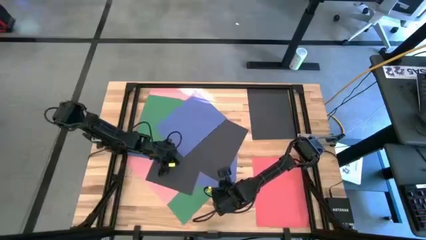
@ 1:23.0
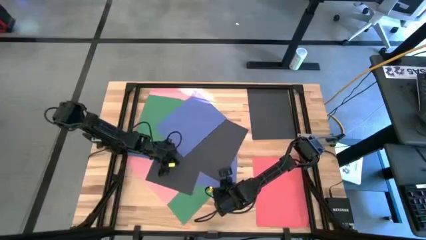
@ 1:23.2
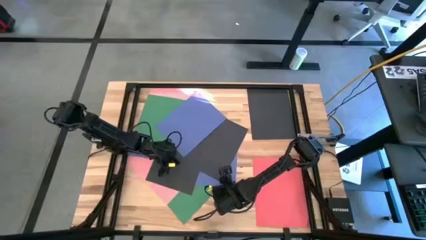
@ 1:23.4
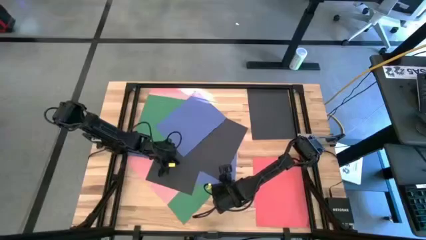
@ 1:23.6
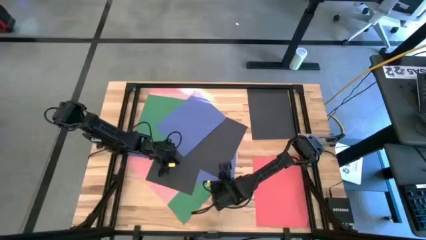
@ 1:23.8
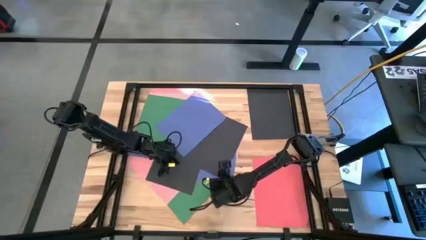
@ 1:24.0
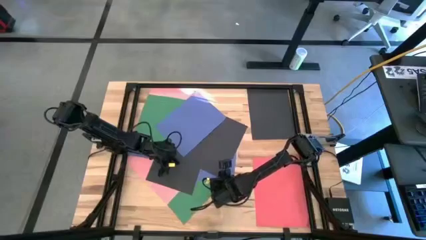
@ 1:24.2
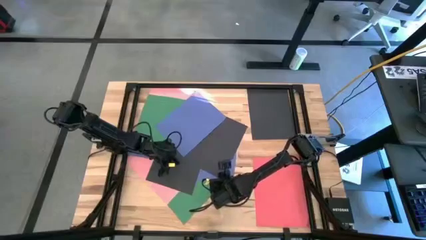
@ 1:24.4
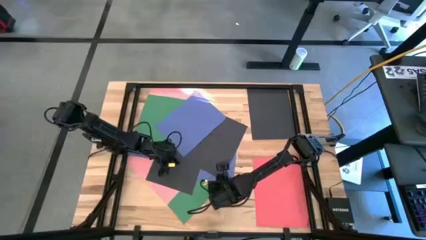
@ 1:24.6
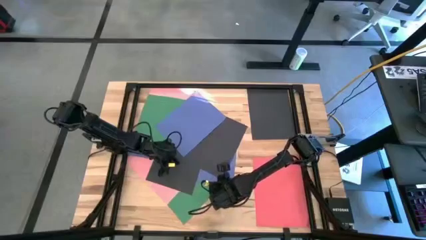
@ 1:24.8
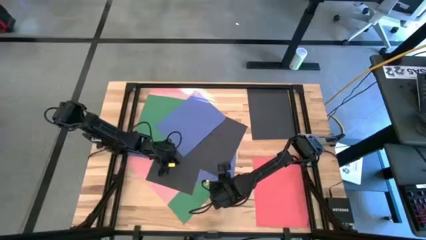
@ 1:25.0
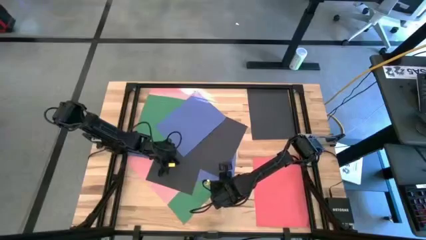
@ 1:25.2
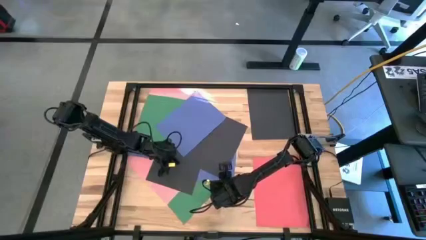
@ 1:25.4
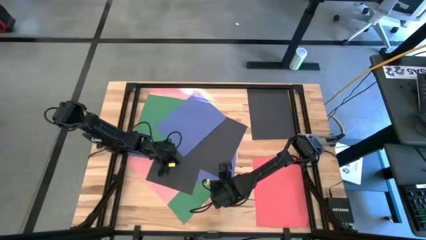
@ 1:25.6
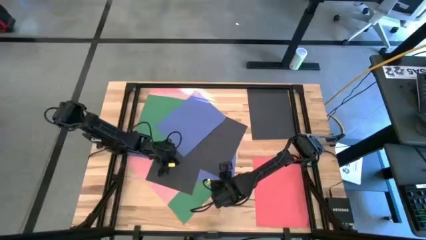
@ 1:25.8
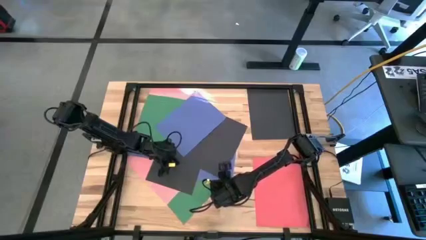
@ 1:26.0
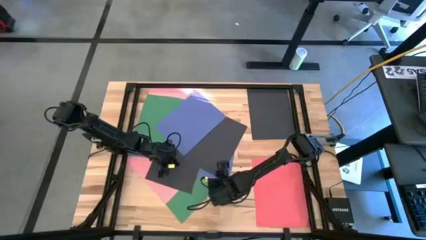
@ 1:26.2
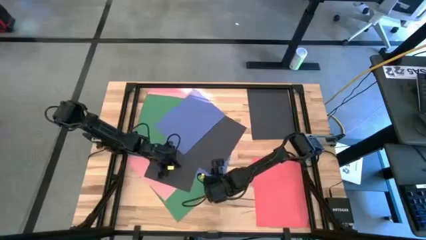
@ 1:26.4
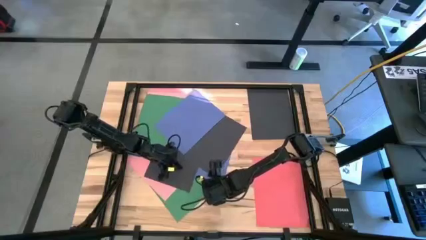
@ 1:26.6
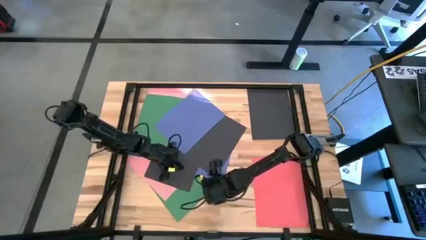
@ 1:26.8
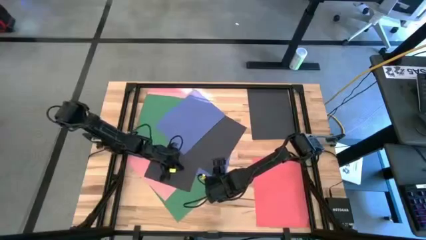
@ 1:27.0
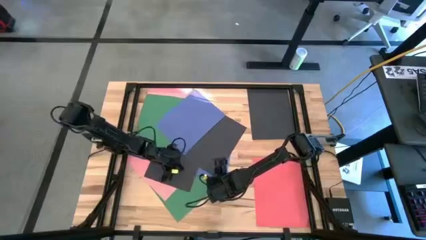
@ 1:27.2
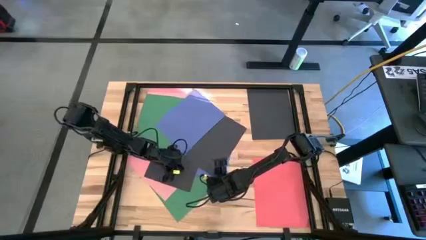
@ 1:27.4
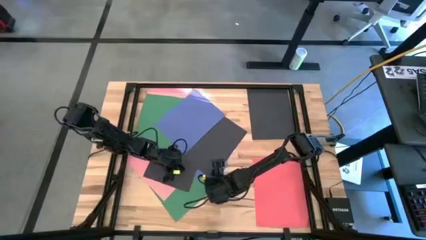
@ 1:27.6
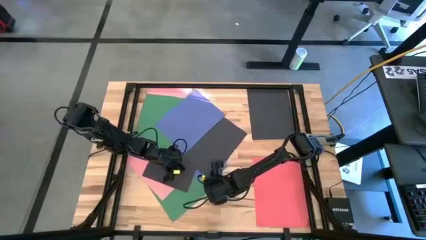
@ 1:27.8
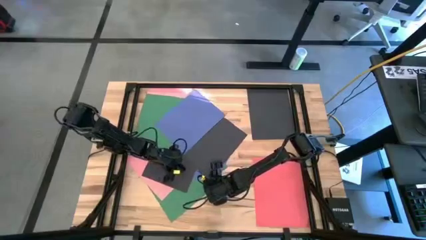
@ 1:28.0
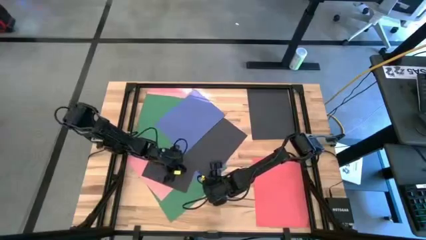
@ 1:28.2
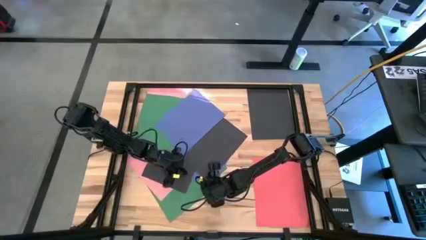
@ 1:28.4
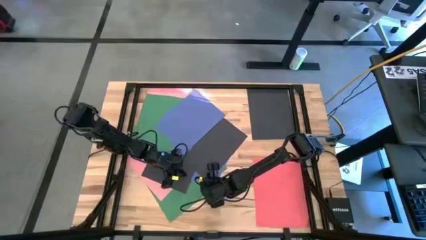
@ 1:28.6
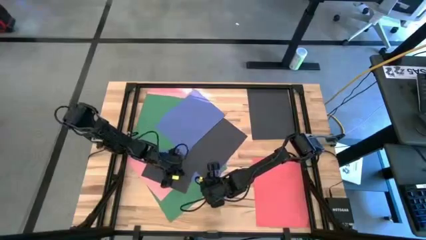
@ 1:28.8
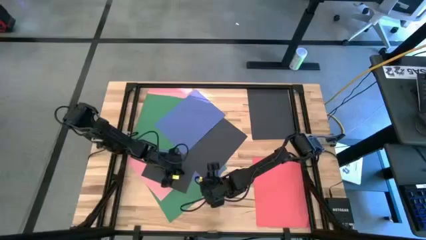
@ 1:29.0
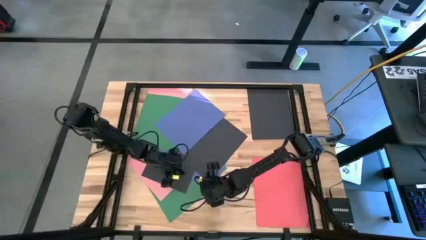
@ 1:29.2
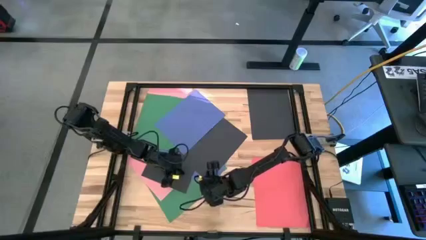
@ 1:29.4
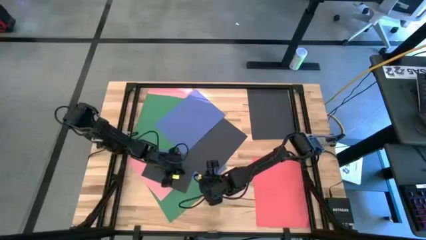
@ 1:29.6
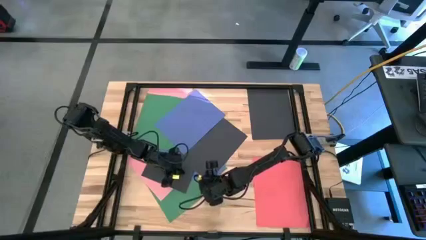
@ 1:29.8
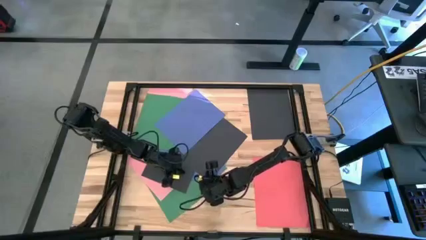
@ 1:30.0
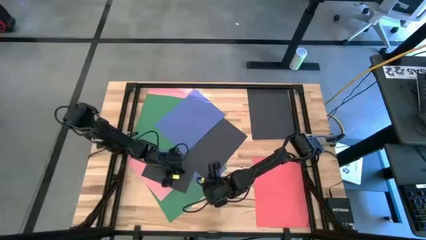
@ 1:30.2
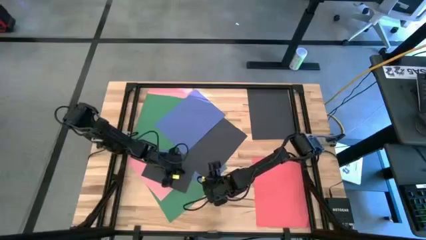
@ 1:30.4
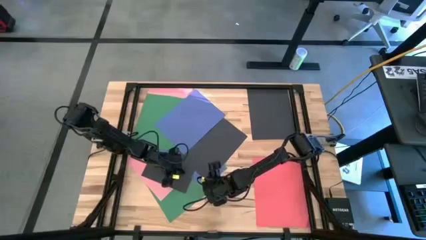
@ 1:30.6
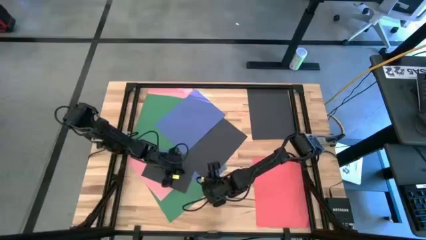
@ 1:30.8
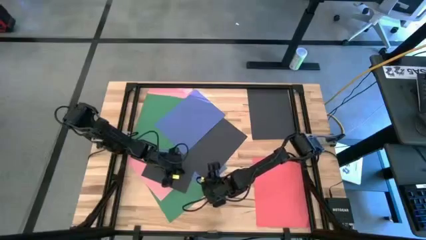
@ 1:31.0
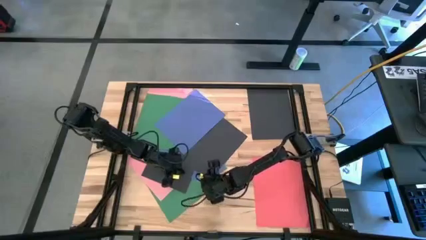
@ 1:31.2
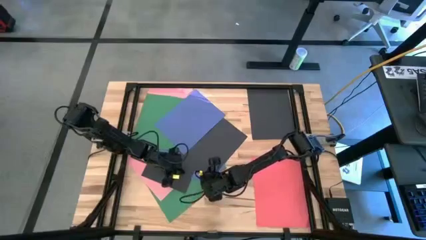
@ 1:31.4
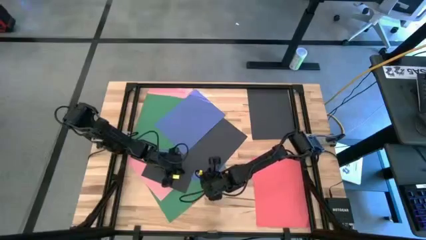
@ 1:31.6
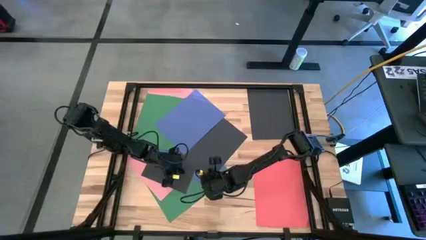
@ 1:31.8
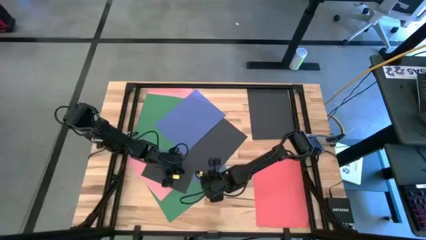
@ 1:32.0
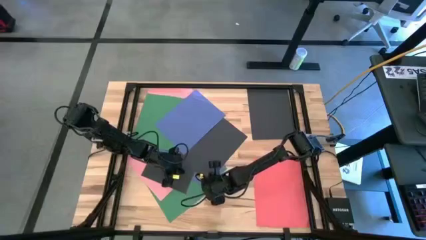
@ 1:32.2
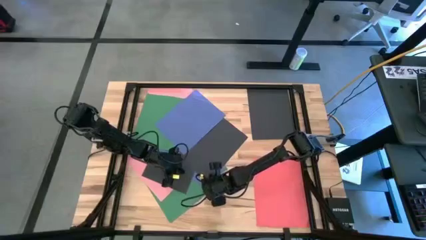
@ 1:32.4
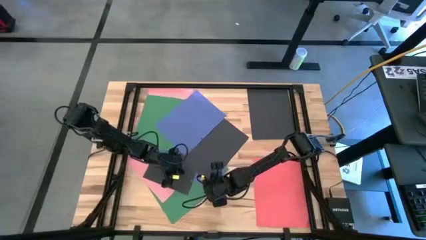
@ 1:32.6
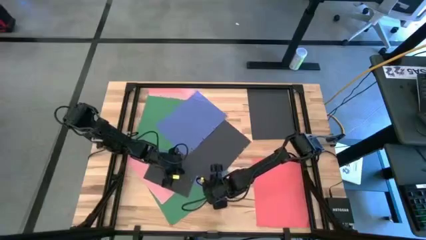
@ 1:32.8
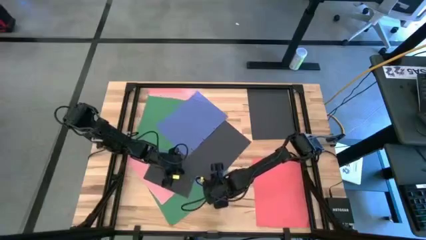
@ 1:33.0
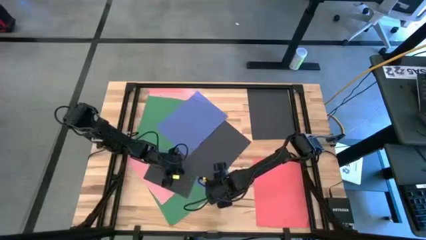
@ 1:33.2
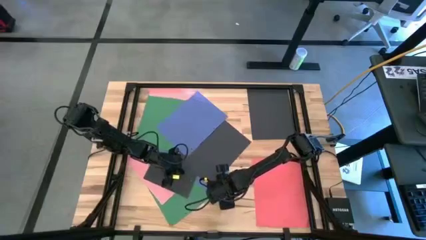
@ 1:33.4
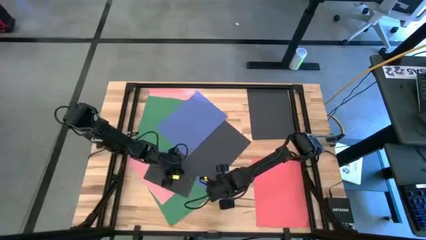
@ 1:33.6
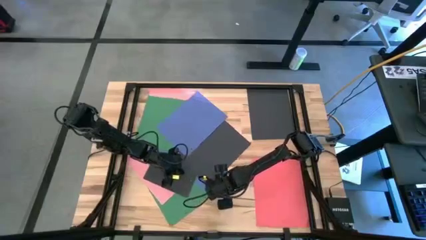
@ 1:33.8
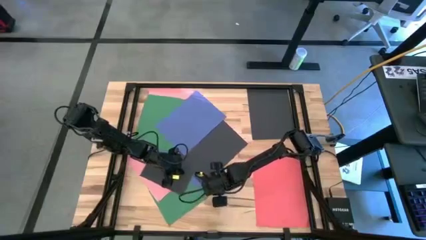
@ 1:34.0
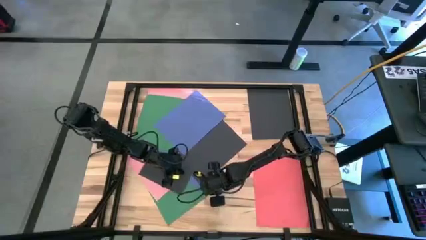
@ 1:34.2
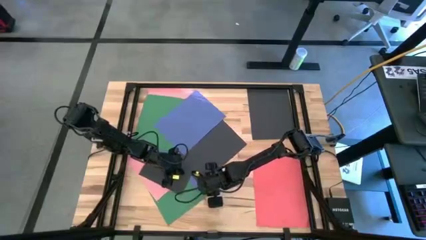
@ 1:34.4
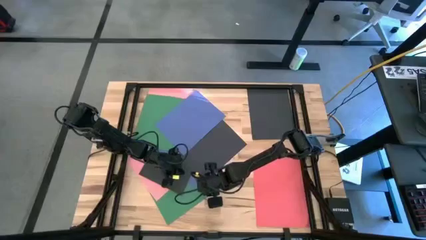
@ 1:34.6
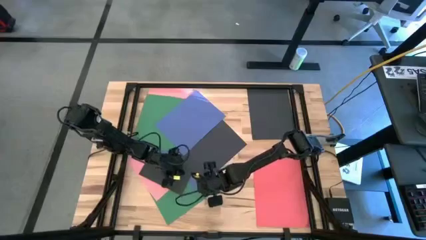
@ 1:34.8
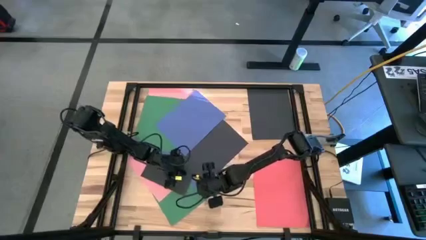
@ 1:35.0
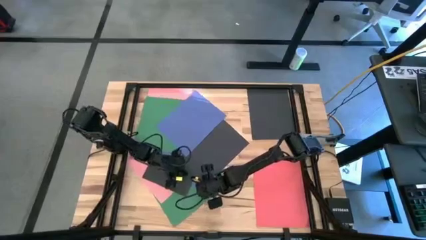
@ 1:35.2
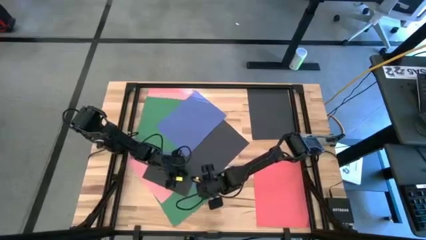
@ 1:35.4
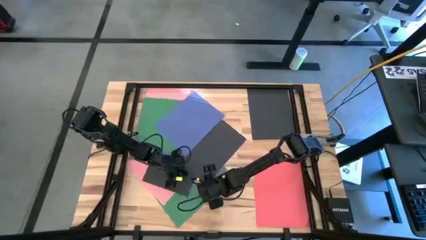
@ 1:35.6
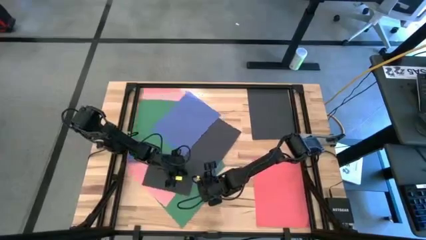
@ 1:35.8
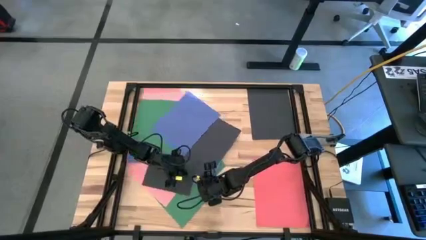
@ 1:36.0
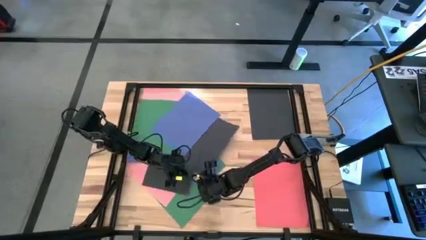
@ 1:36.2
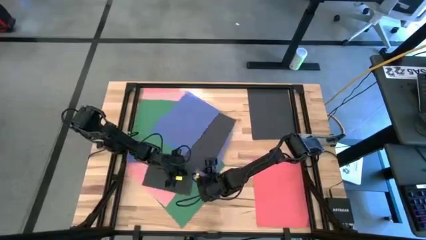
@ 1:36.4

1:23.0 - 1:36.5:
Task: Organize paper
Stack the black paper on top of the other black paper on the table

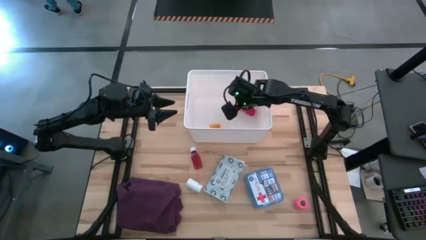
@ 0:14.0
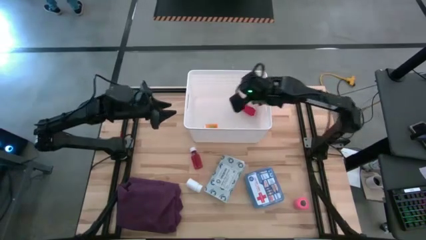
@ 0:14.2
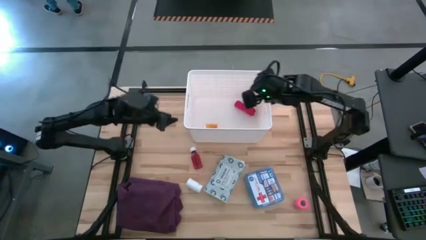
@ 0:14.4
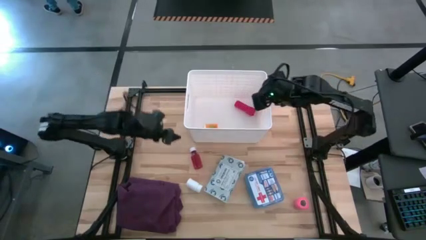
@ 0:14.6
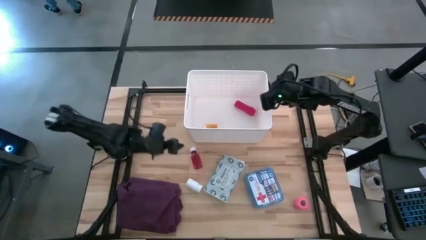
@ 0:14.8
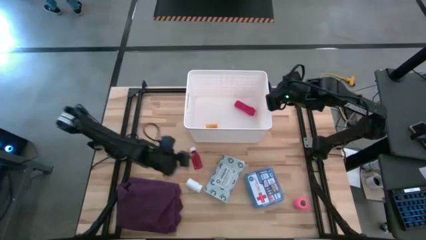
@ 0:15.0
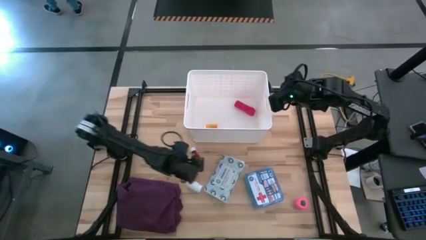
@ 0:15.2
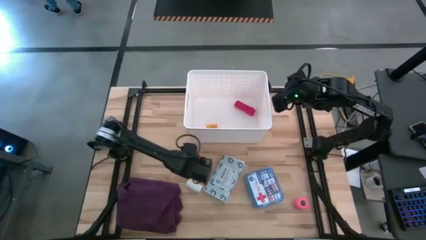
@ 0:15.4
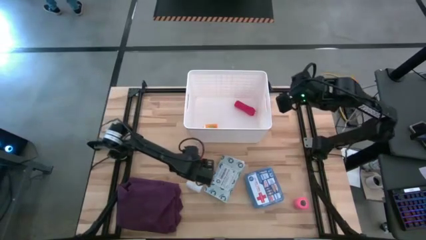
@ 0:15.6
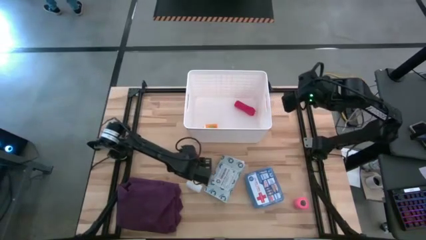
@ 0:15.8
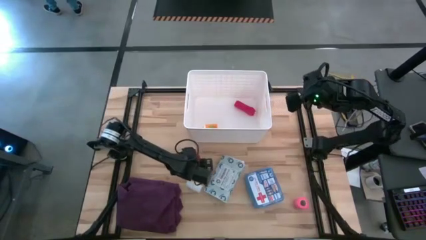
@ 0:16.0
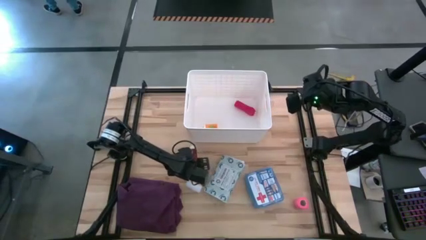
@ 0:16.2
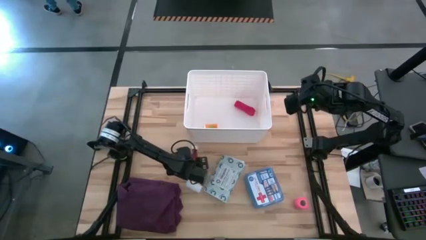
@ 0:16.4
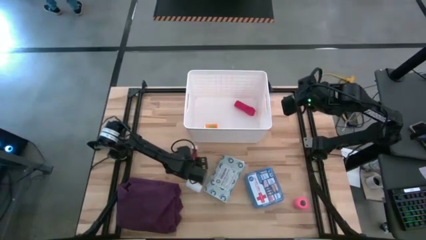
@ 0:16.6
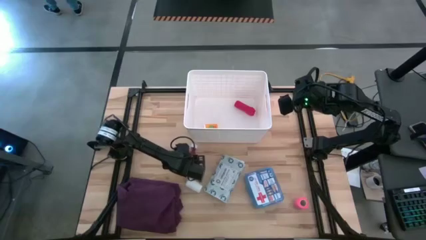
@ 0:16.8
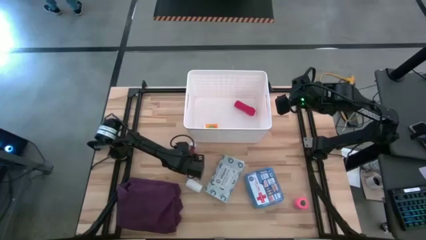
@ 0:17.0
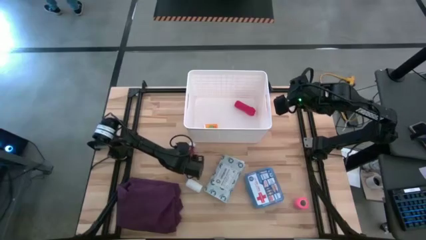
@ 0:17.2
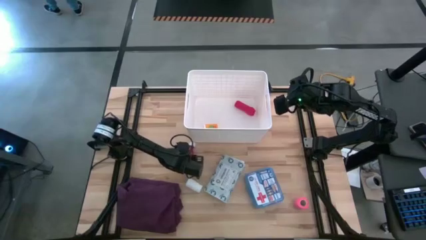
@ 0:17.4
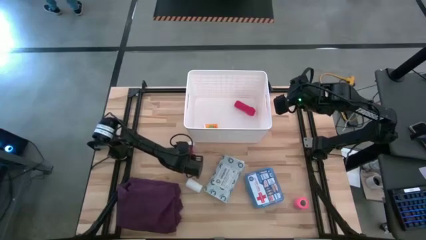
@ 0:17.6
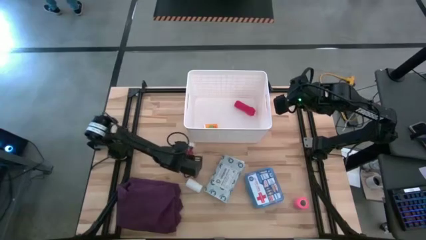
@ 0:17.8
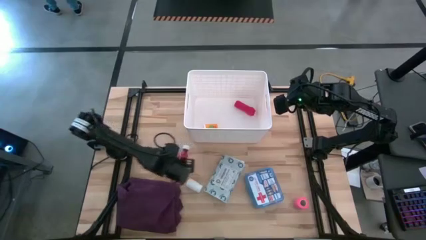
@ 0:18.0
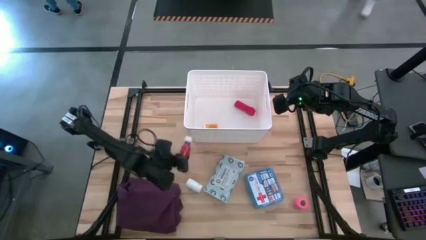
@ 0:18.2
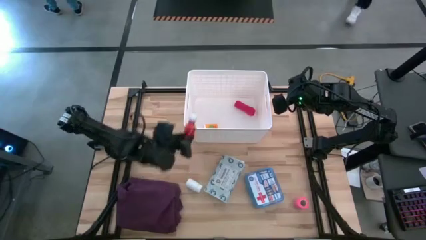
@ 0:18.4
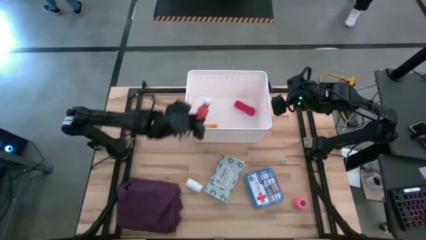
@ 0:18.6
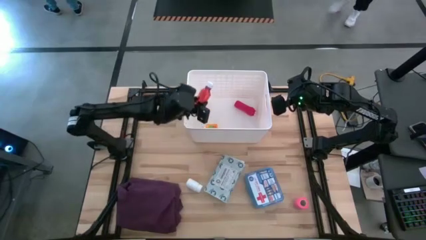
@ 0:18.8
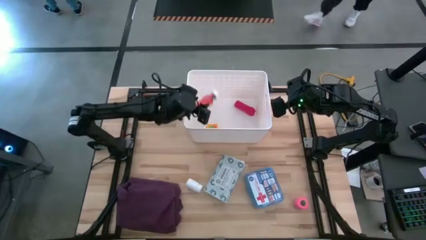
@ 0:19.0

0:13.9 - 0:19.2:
Task: Pick & place medical supplies in basket/bin
Put the red pill bottle into the white bin
